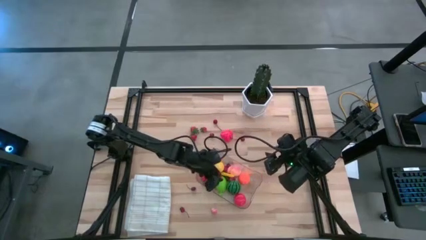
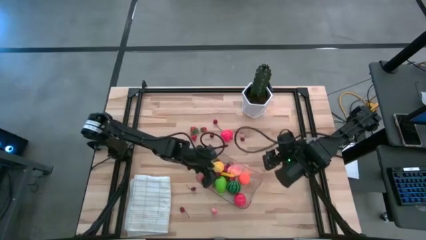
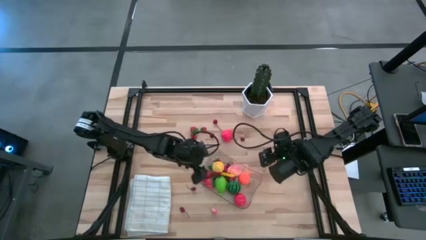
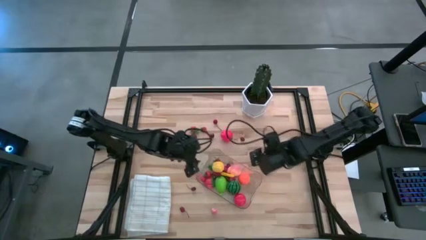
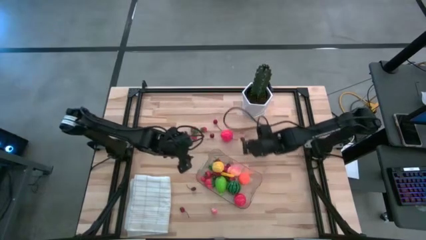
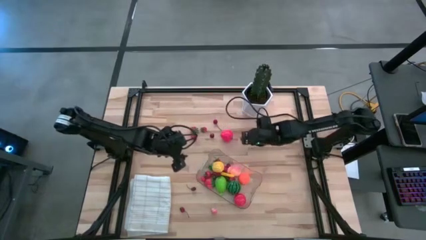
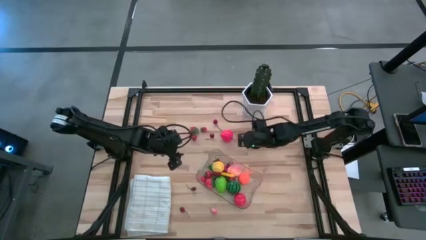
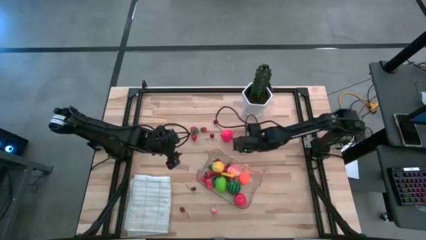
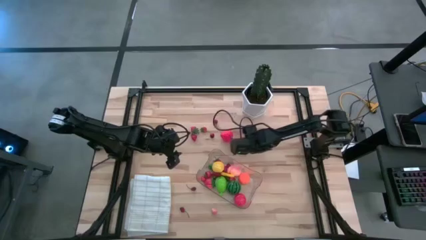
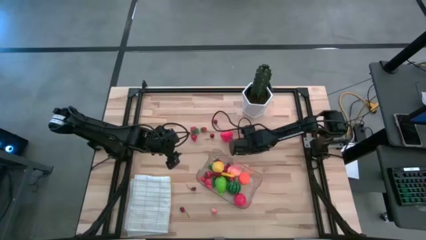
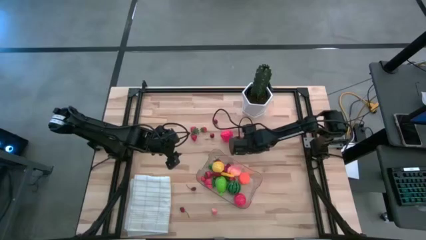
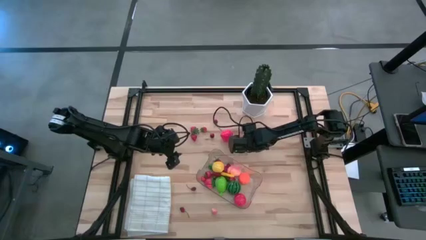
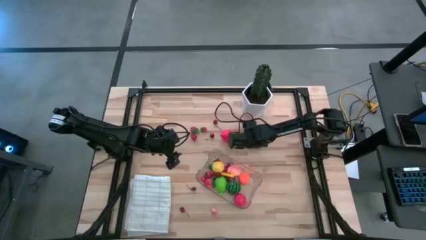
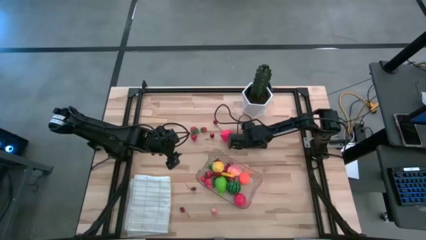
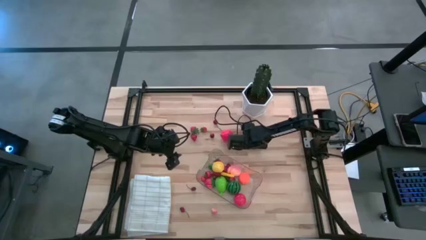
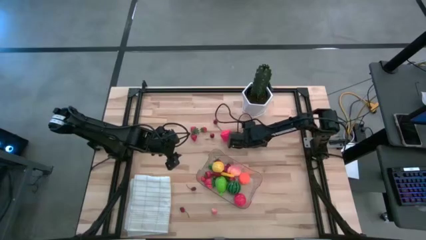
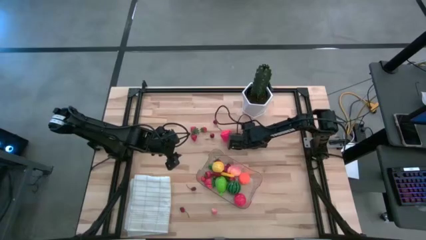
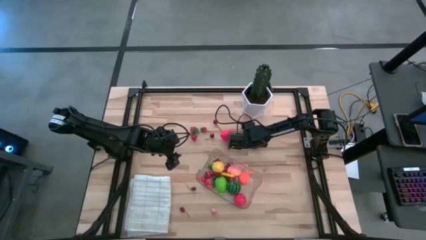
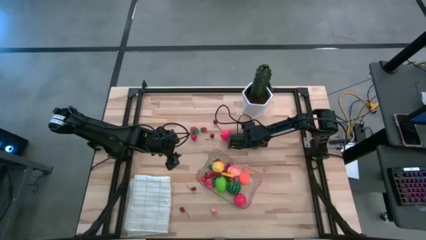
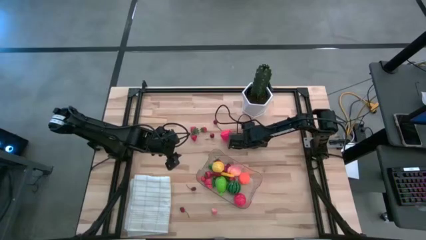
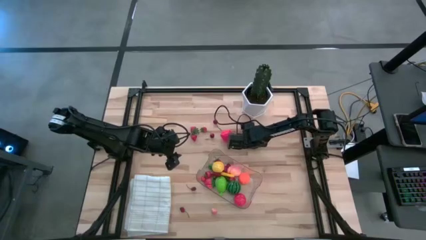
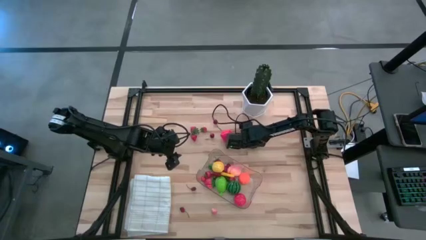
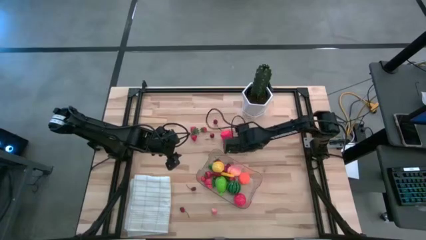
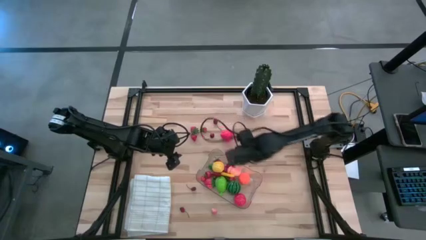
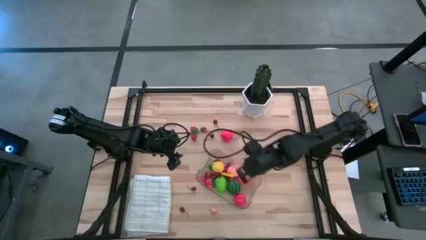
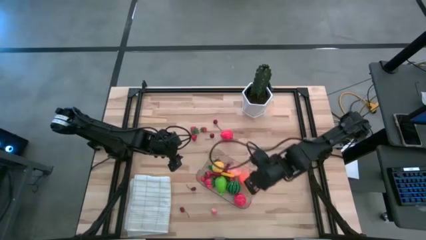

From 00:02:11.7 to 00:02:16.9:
Task: Pick and placing Produce into tupperware
Put the red cherry into the transparent bin

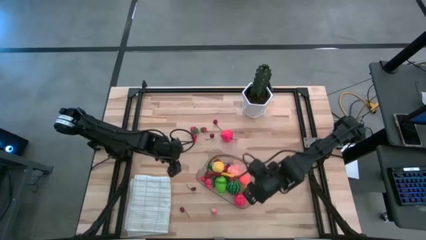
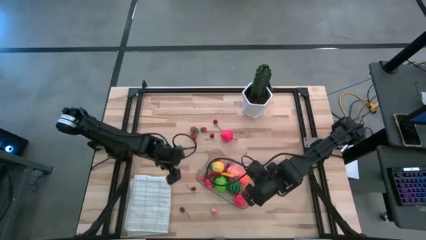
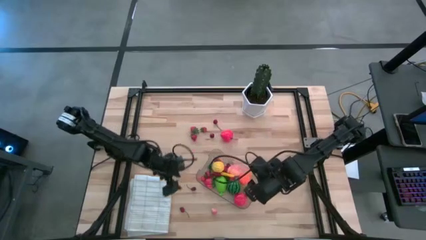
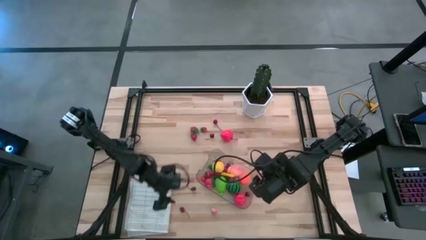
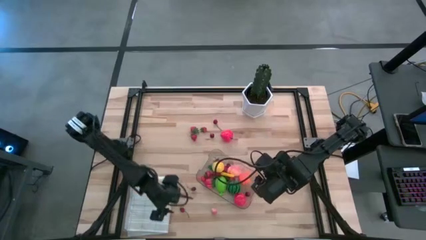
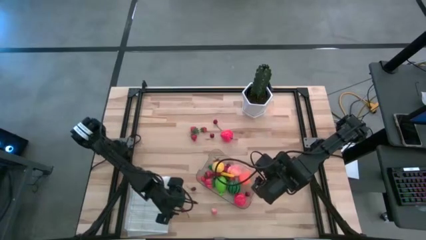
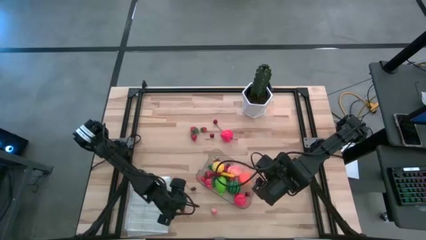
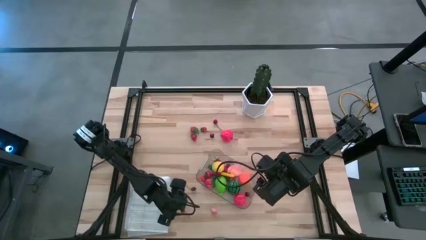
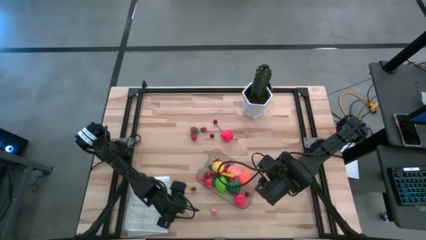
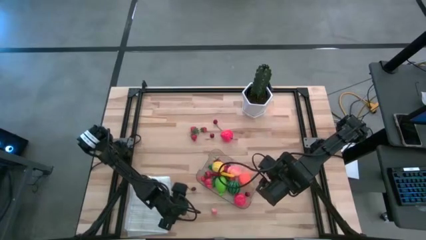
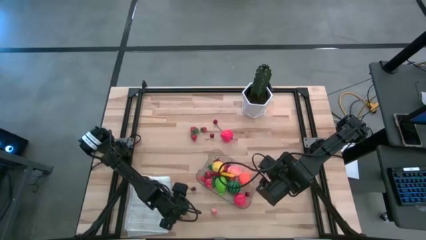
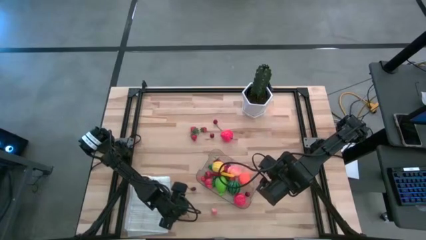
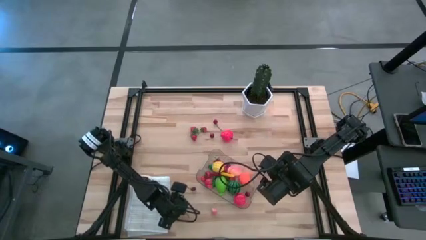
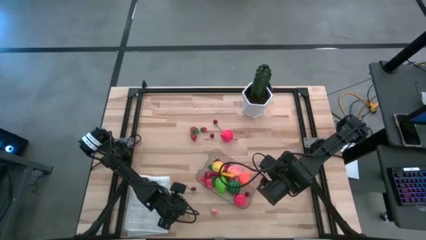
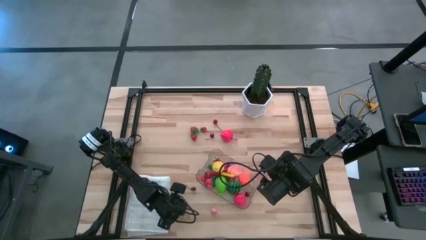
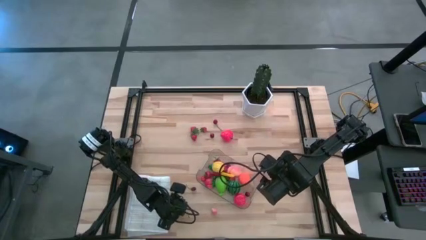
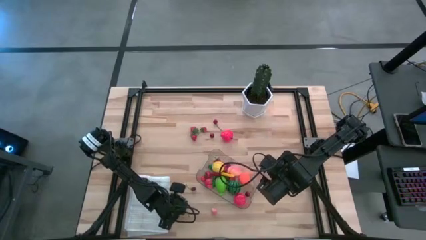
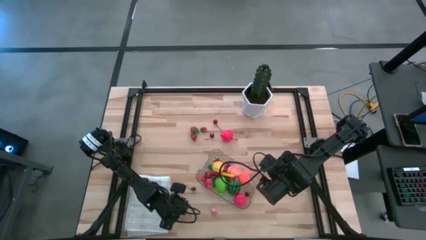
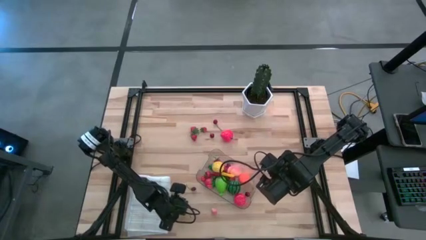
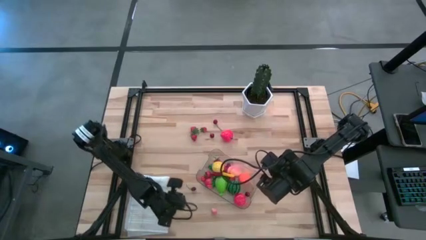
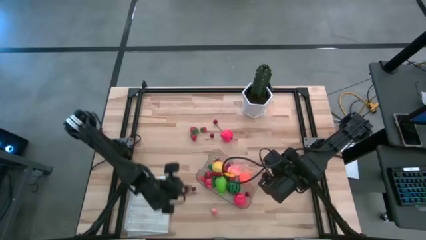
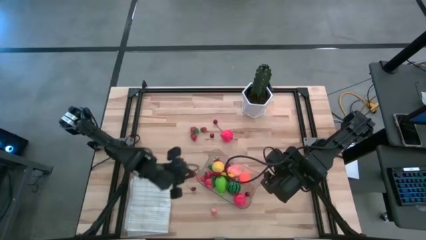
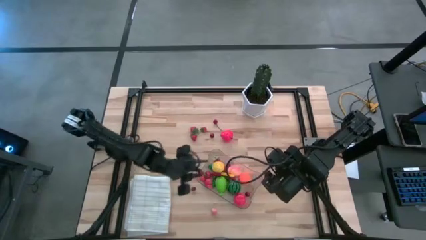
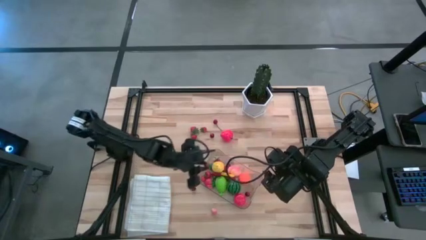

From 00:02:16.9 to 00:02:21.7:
Put the red cherry into the transparent bin

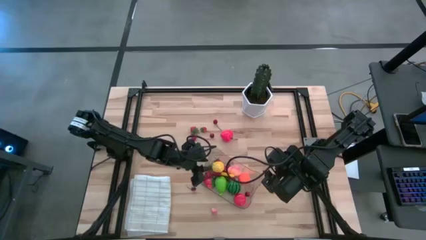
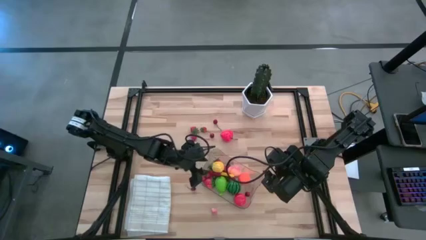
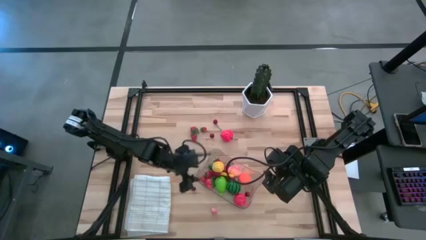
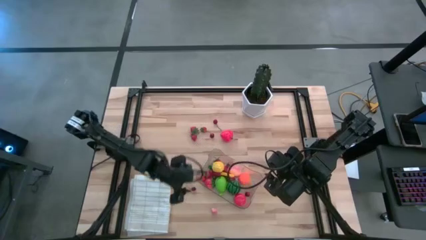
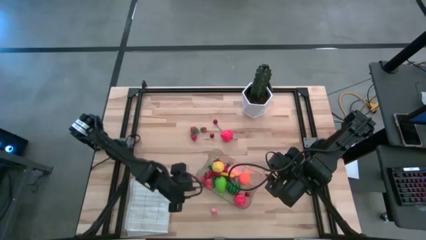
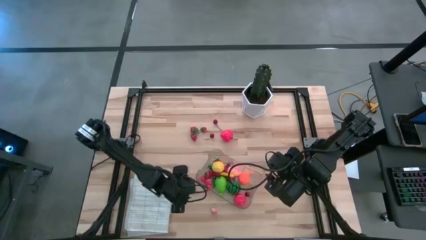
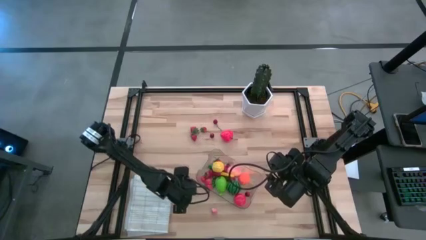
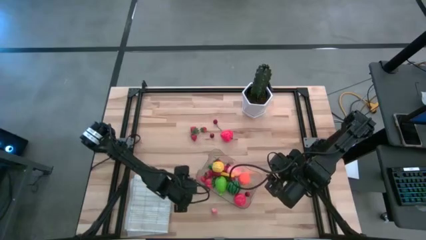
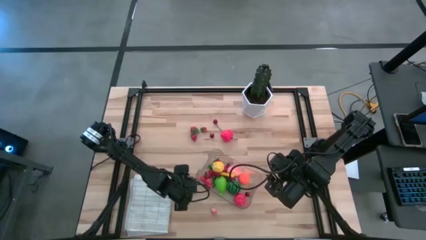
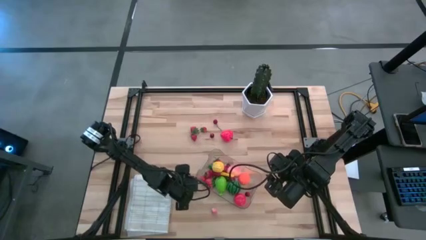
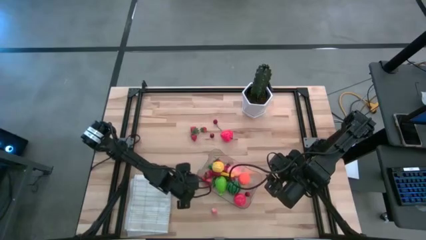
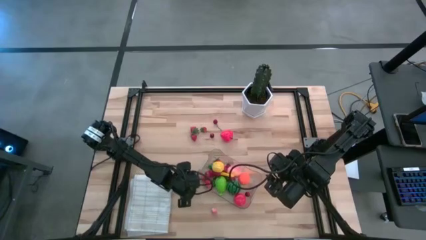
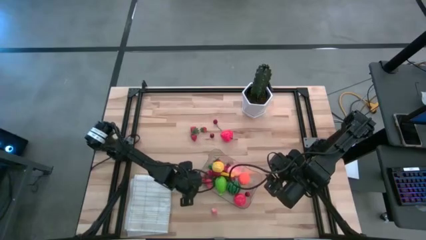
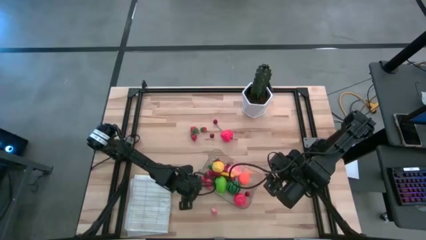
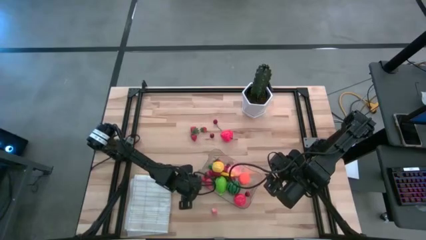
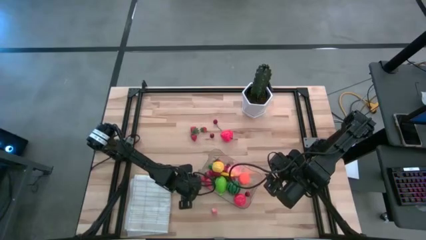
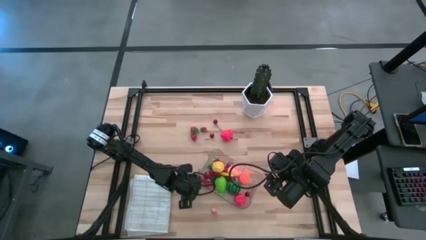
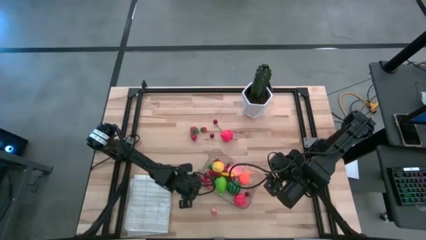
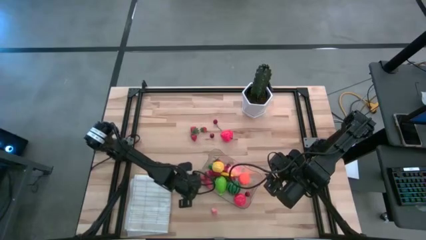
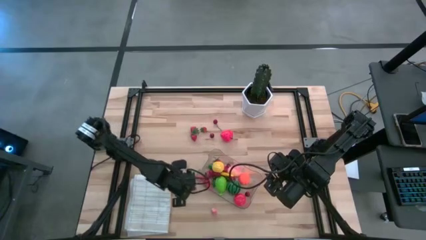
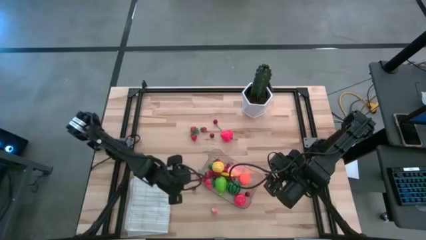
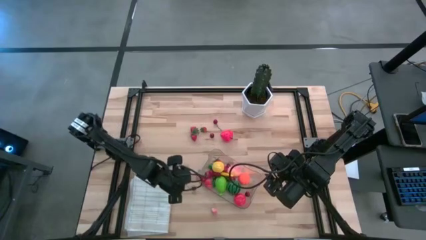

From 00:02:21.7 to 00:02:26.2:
Put the red cherry into the transparent bin

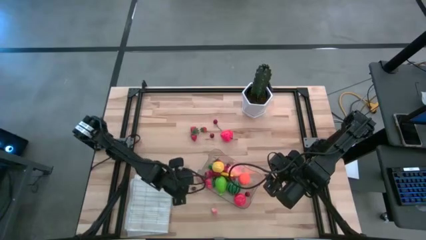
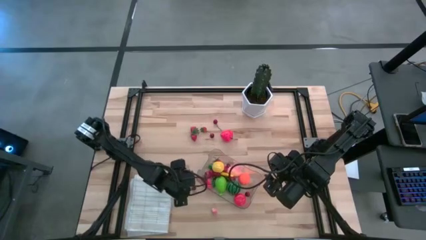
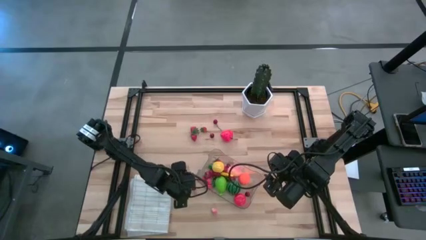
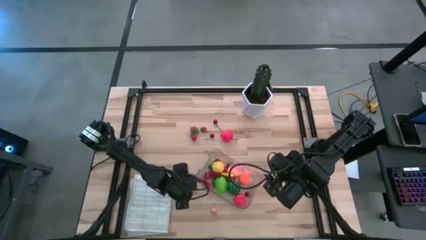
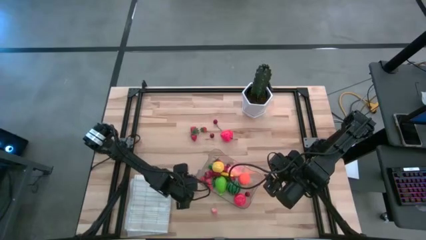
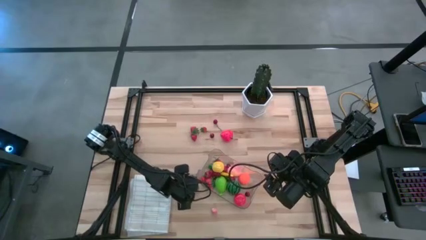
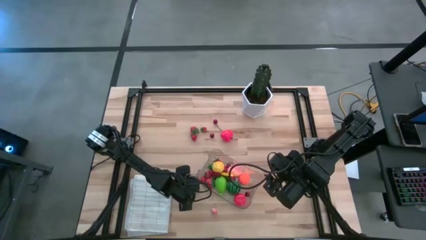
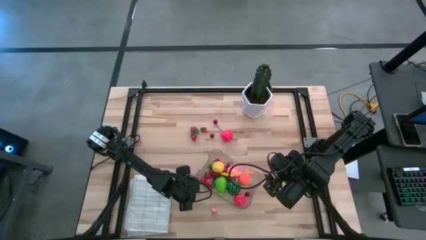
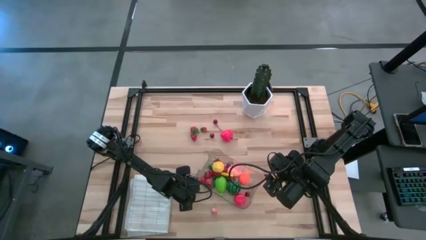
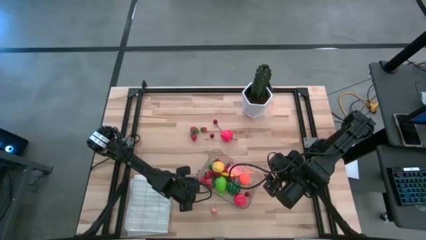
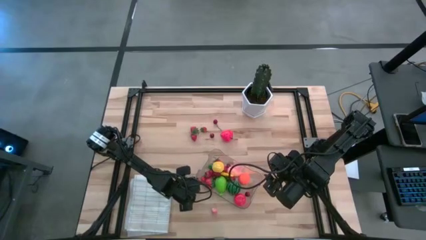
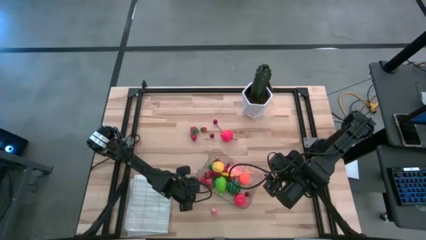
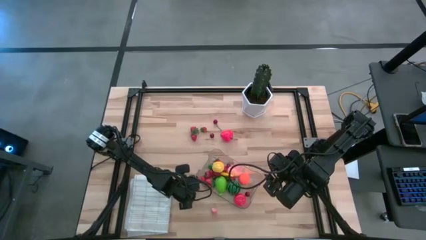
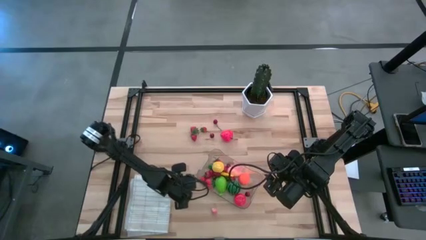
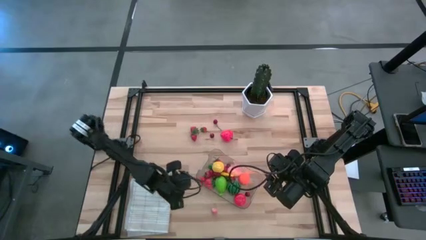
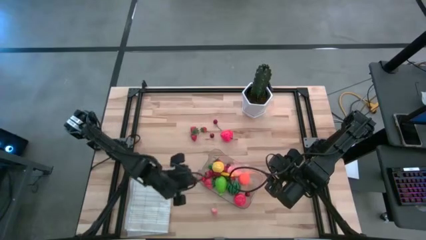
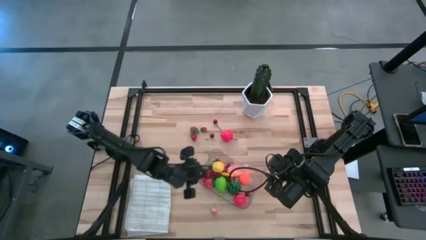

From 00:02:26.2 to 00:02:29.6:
Put the red cherry into the transparent bin
